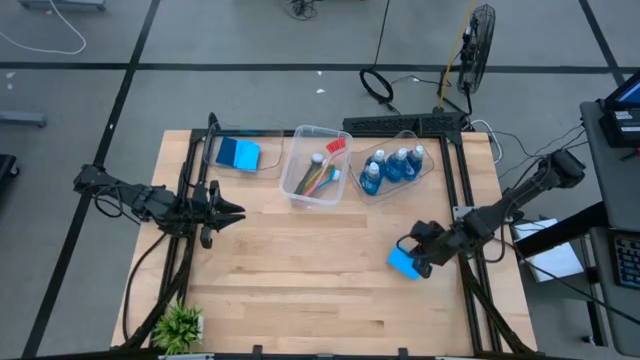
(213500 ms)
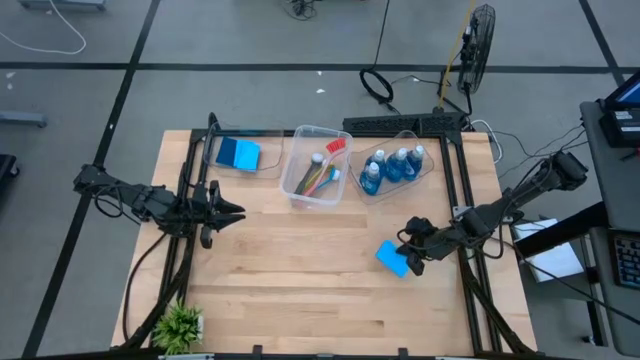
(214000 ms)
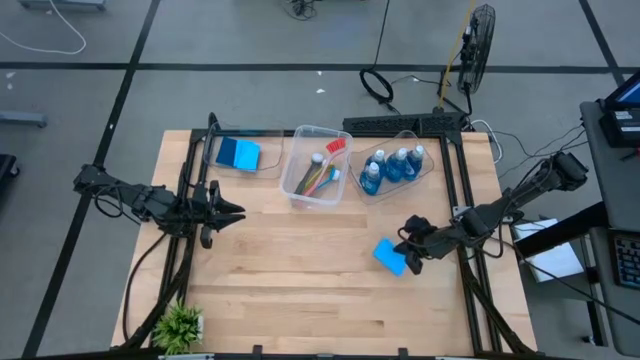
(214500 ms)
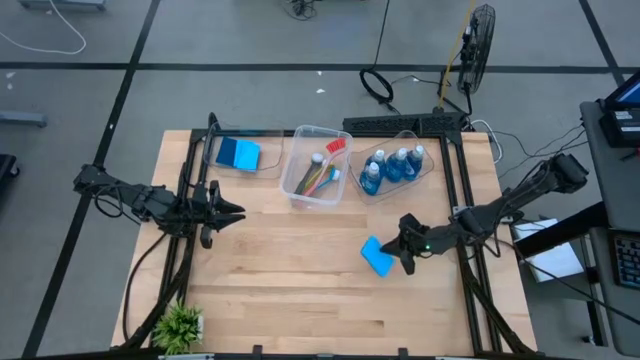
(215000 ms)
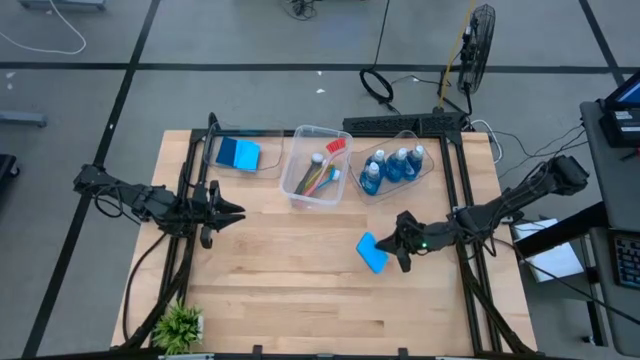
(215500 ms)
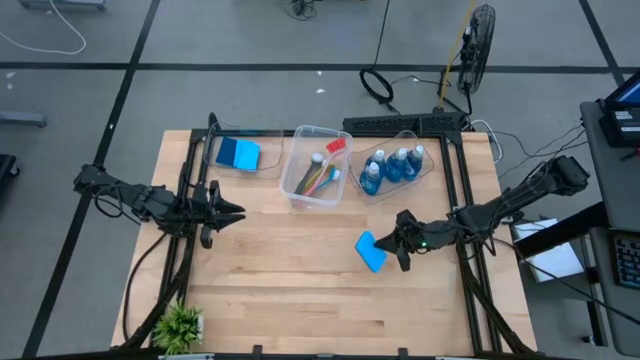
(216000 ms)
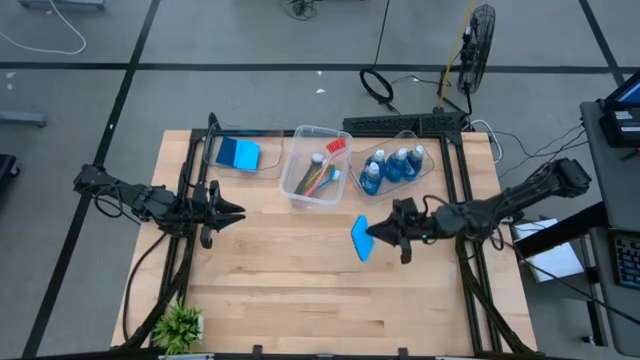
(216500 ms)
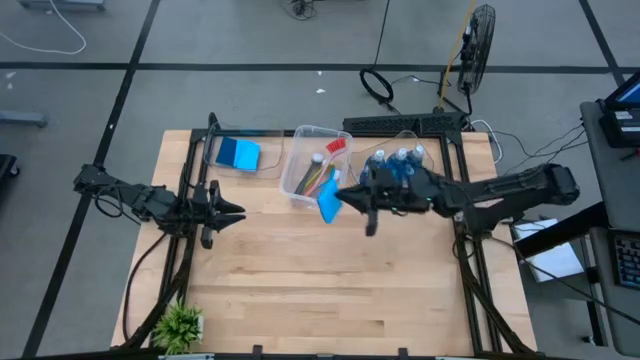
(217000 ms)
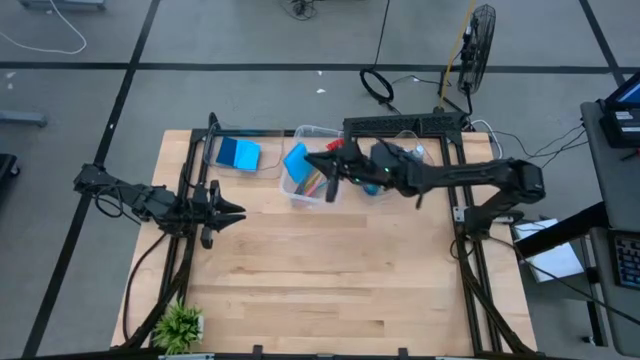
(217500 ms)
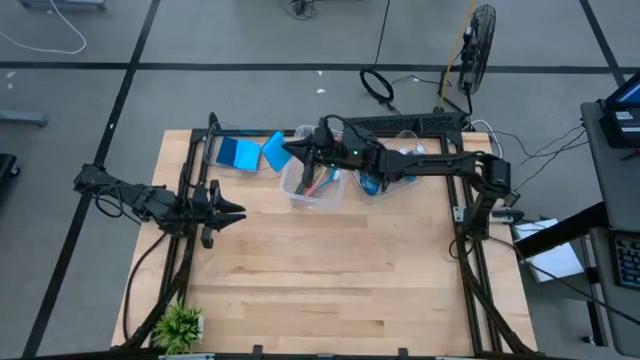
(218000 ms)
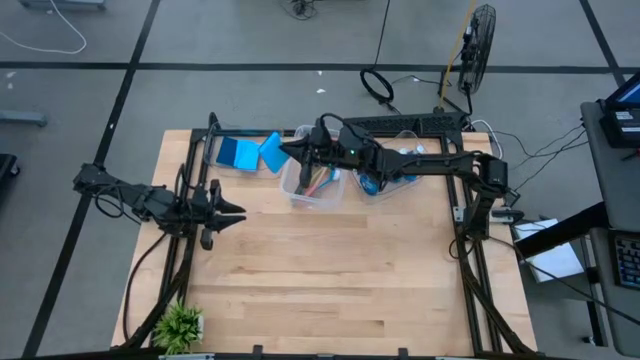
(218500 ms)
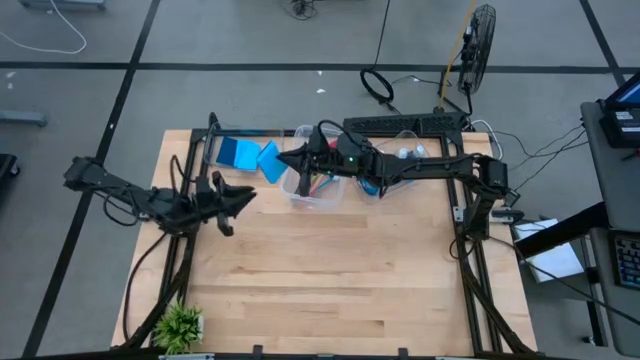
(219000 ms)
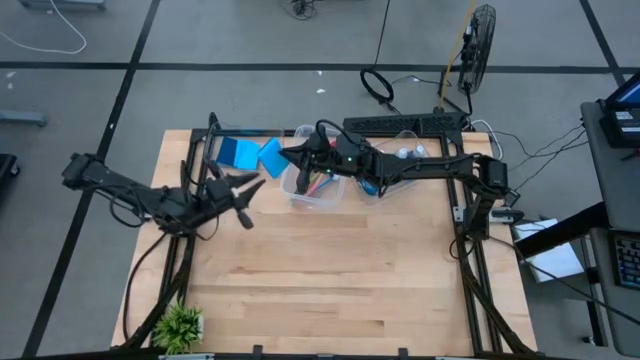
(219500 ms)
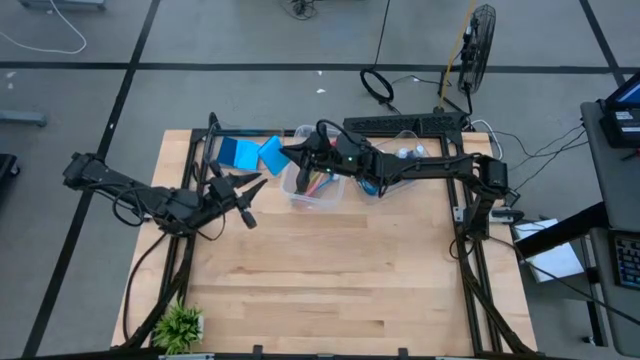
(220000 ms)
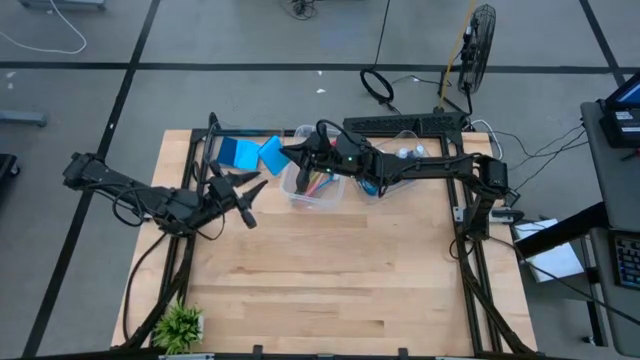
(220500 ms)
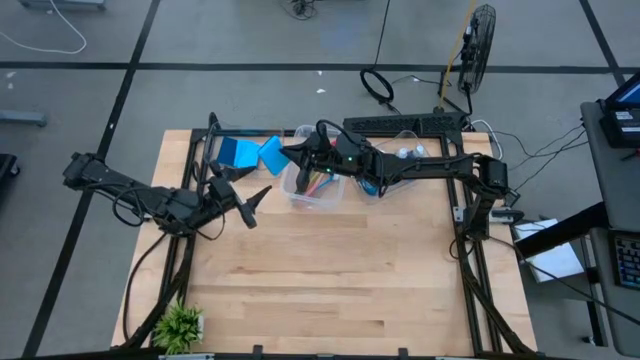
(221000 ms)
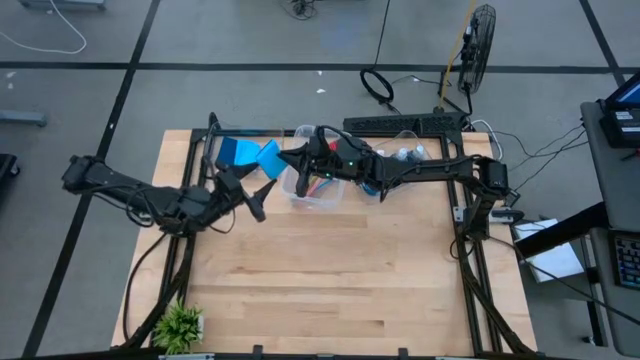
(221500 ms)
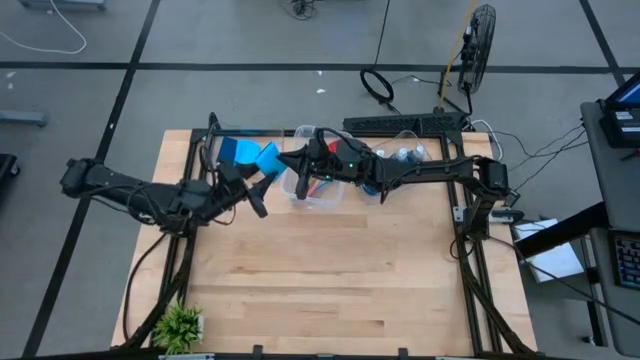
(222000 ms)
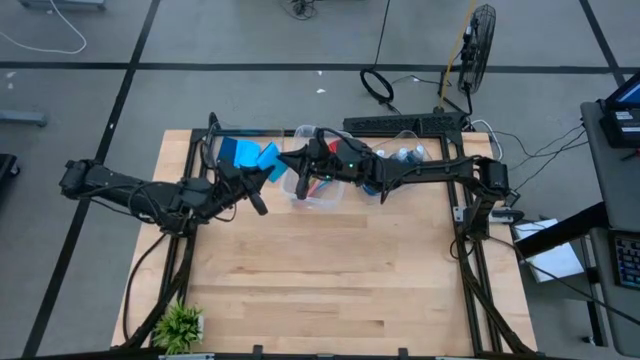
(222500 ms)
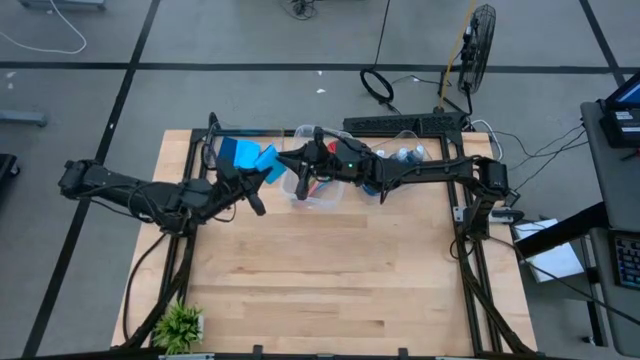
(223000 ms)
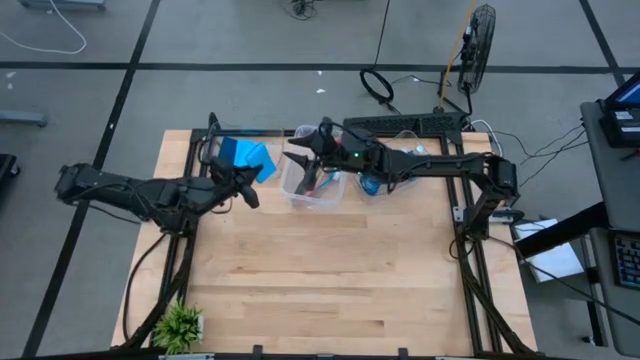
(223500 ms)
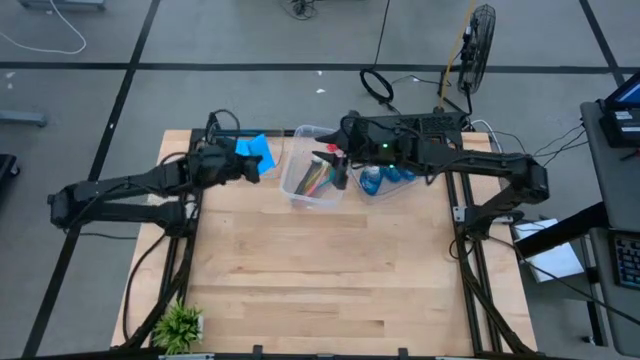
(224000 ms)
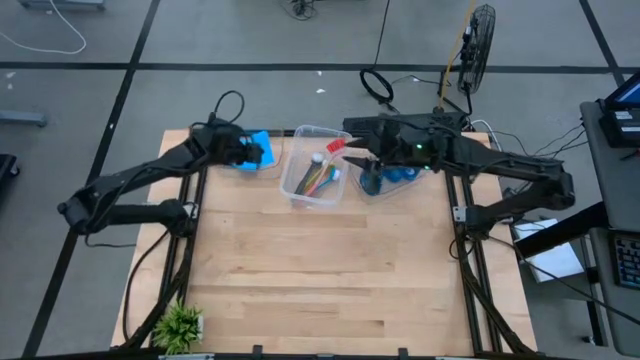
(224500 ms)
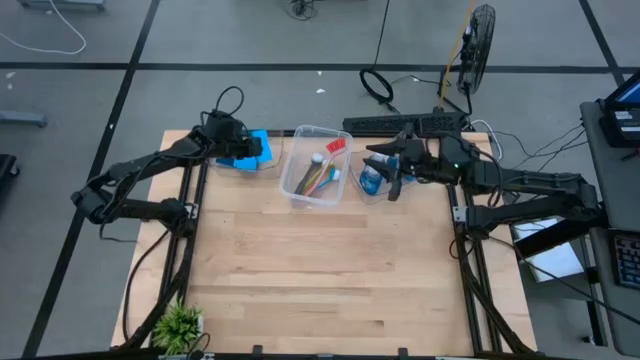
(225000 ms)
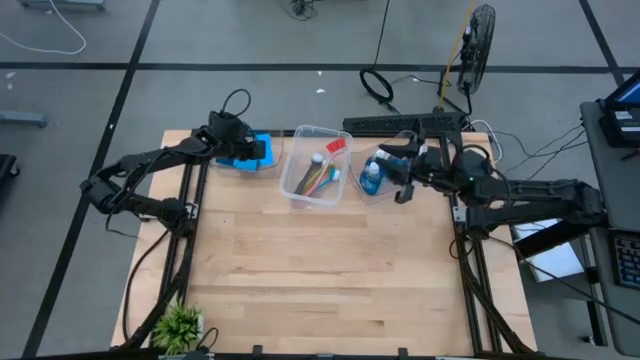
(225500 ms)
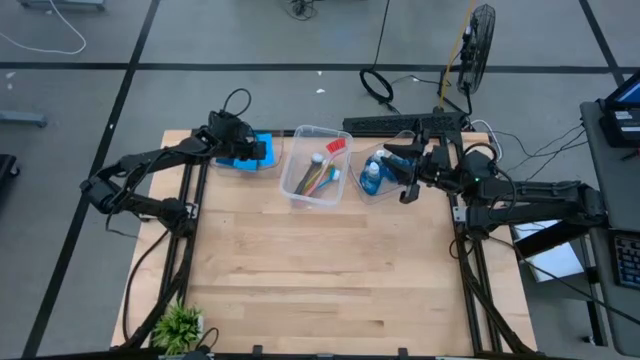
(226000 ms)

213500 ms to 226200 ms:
Task: Pick & Place Kitchen Sink Supplies
Put the blue sponge into the left transparent bin

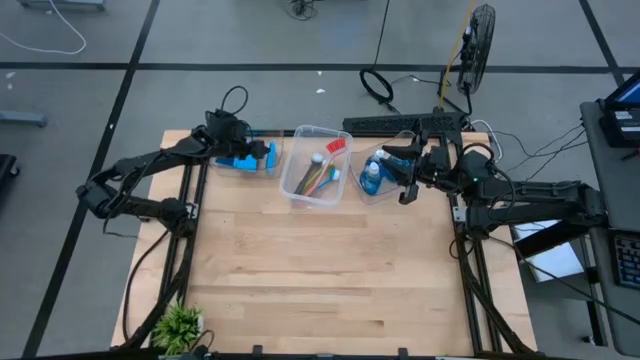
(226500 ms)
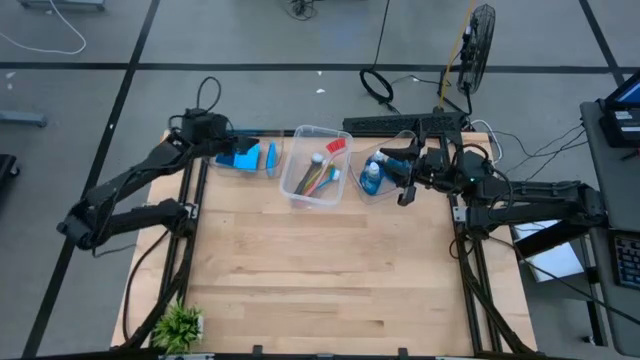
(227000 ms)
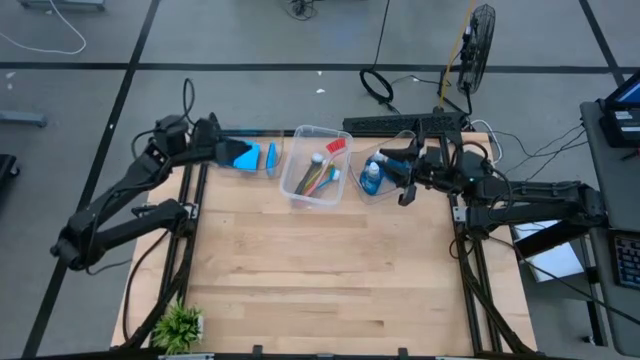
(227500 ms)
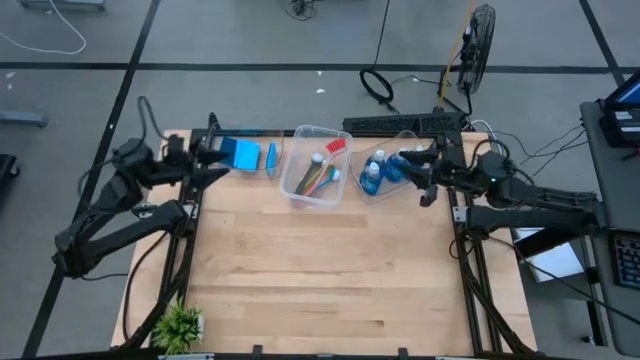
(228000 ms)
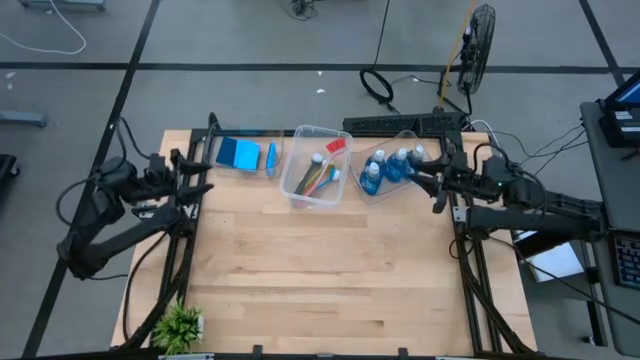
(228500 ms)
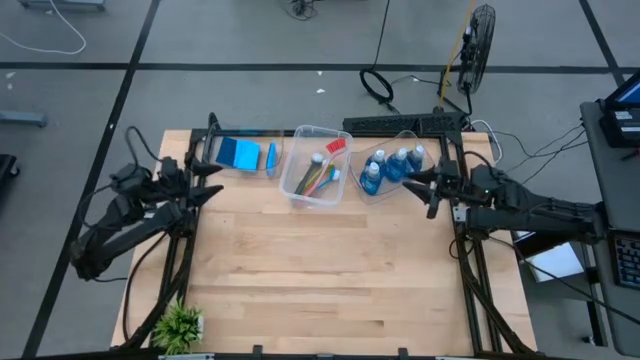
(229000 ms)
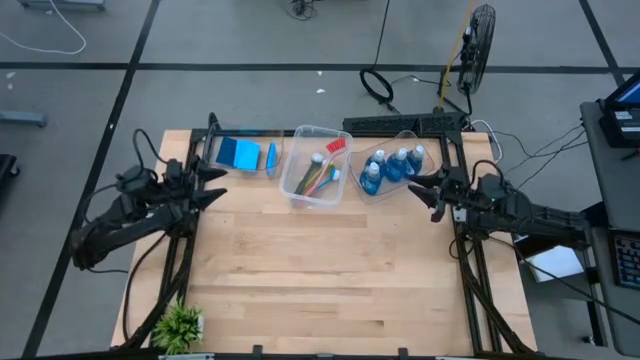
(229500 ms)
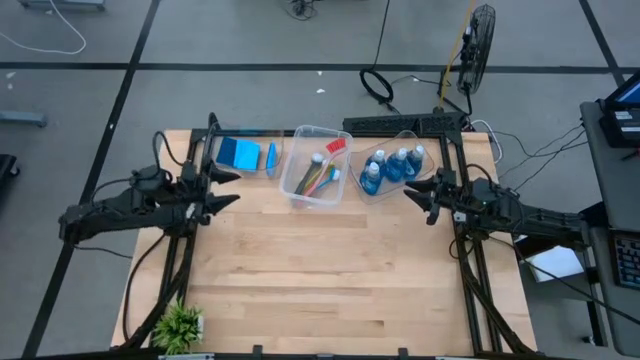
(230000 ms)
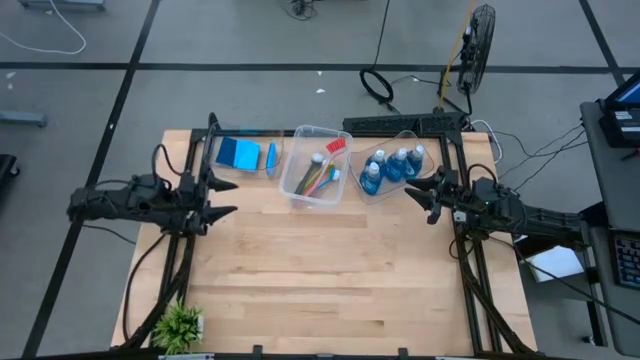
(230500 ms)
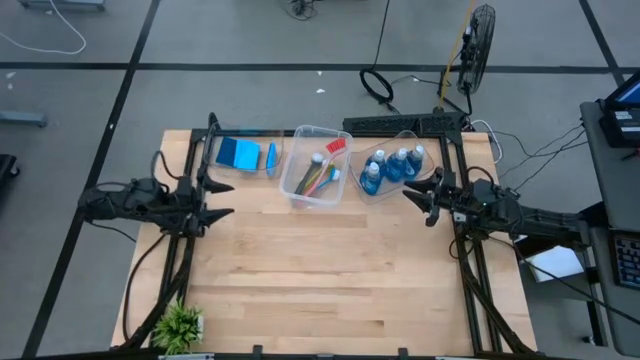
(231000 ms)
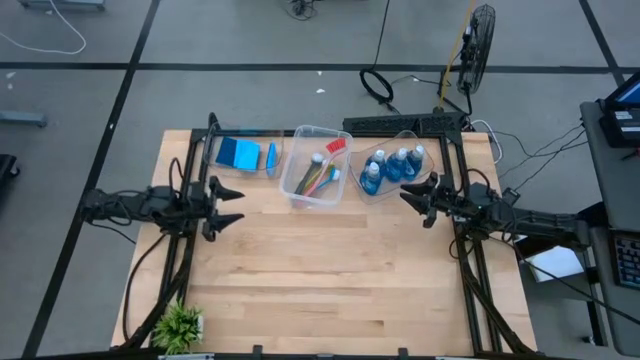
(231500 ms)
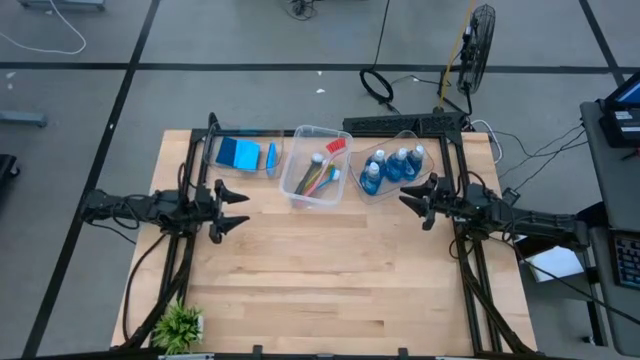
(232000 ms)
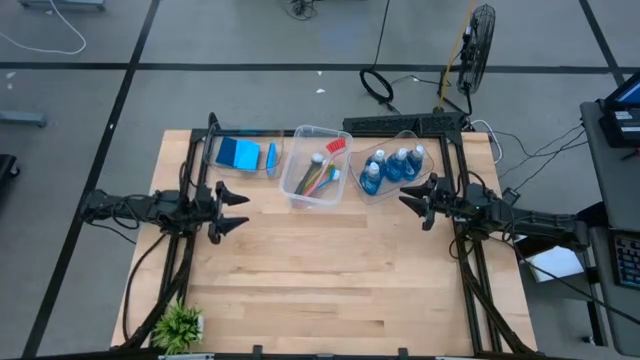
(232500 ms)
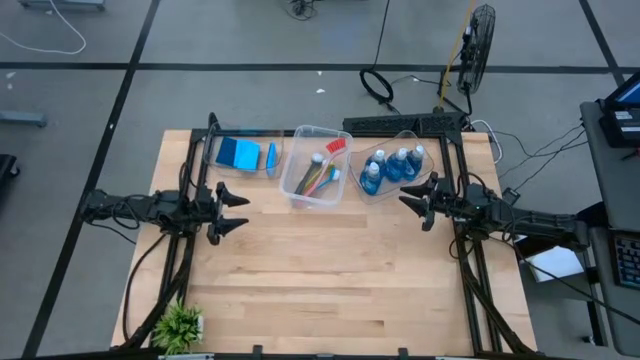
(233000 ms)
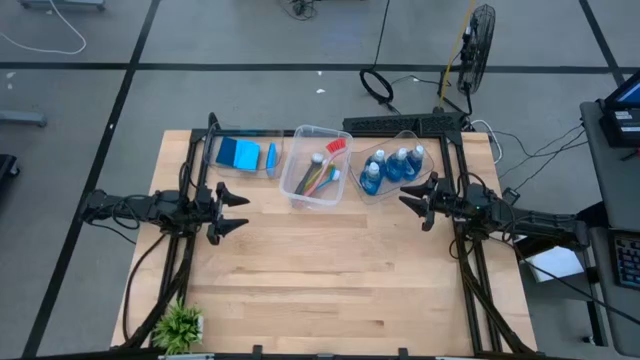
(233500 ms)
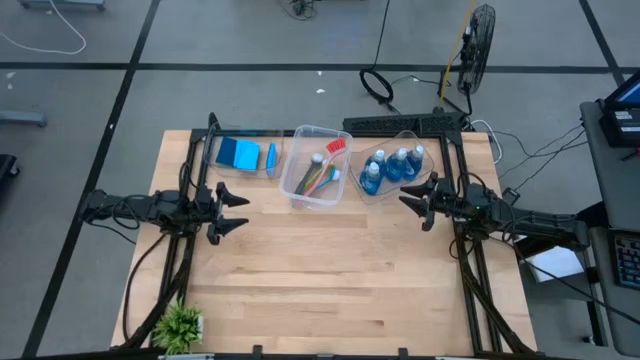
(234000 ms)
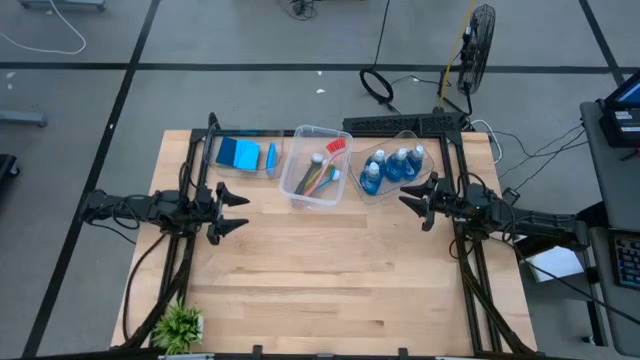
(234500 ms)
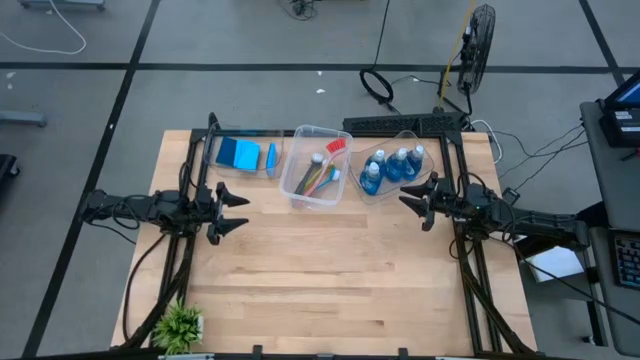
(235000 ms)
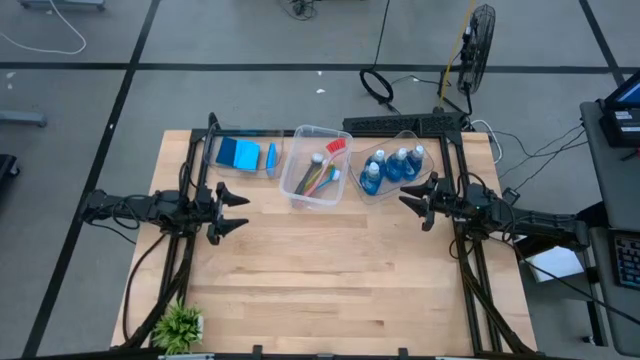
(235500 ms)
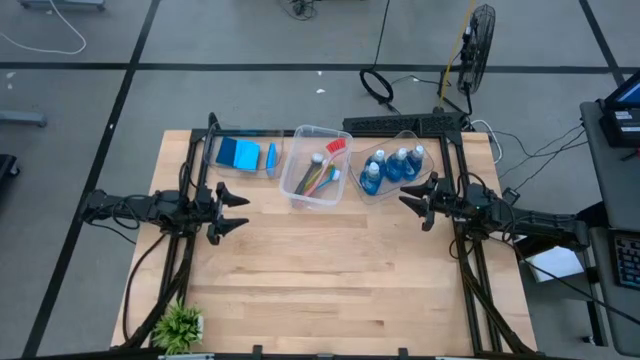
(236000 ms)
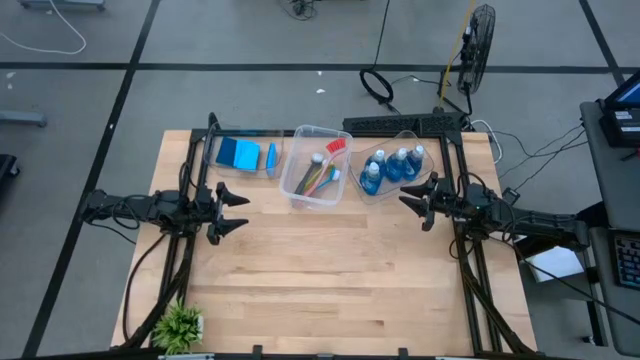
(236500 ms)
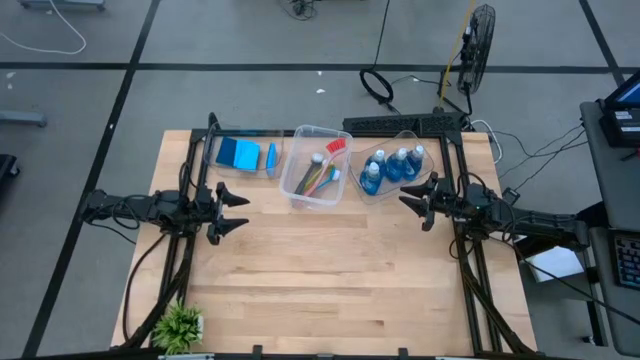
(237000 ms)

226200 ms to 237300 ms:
Return to Home Position
